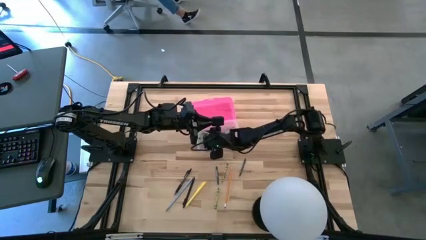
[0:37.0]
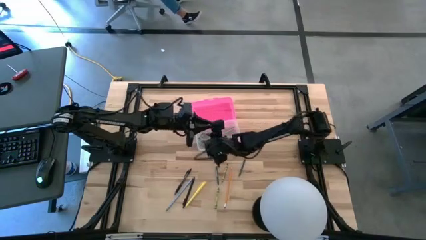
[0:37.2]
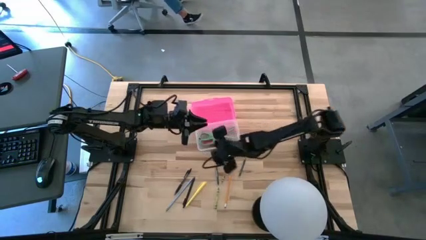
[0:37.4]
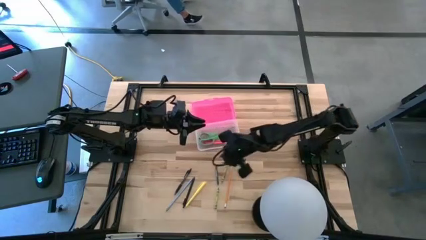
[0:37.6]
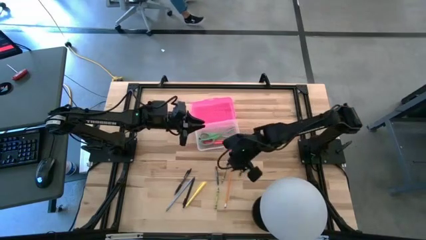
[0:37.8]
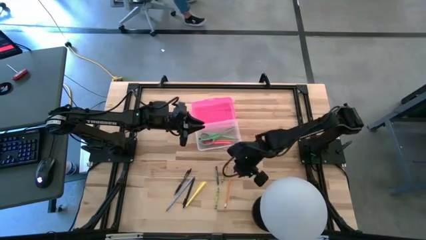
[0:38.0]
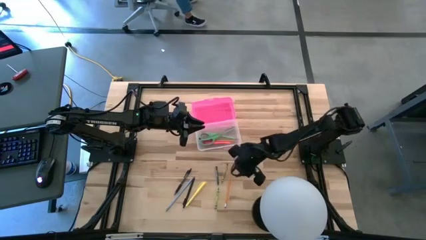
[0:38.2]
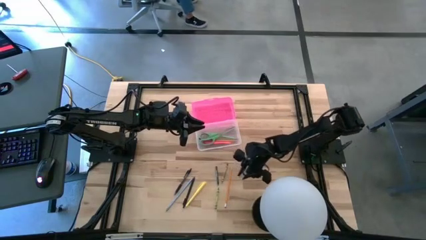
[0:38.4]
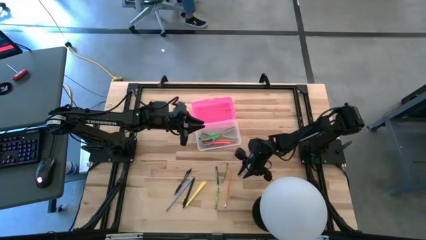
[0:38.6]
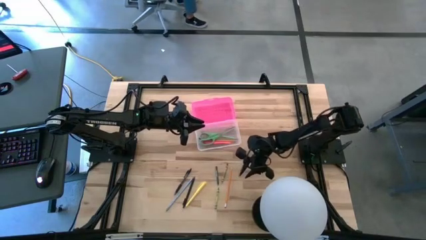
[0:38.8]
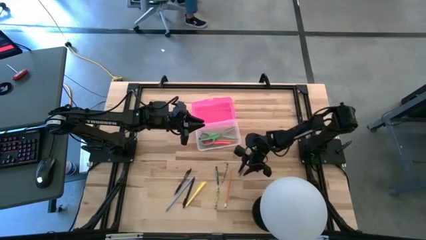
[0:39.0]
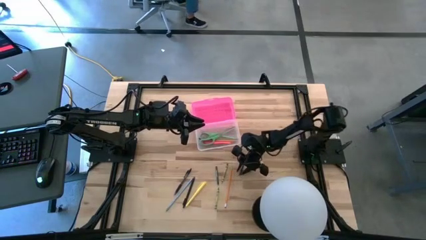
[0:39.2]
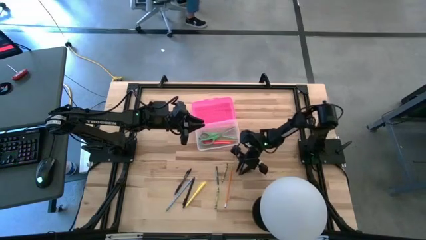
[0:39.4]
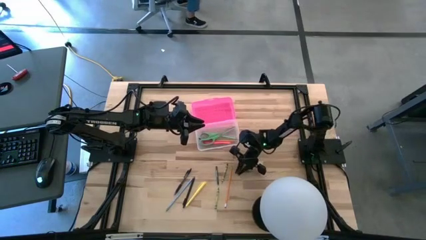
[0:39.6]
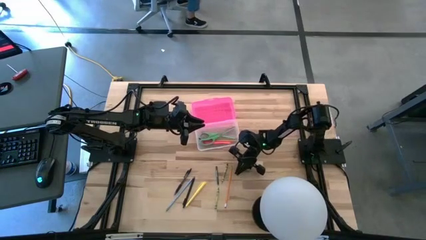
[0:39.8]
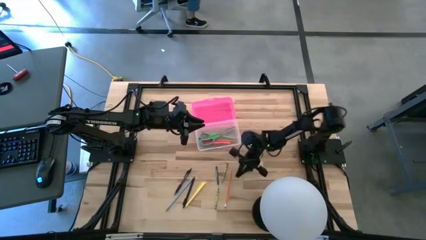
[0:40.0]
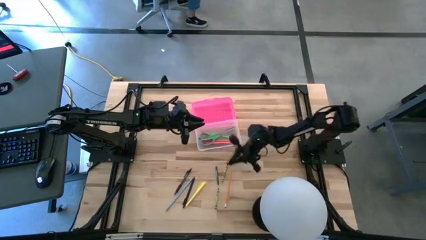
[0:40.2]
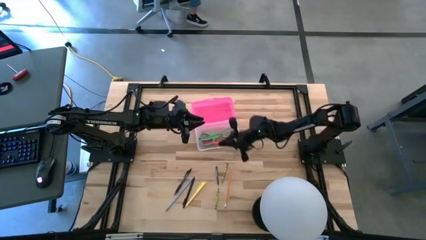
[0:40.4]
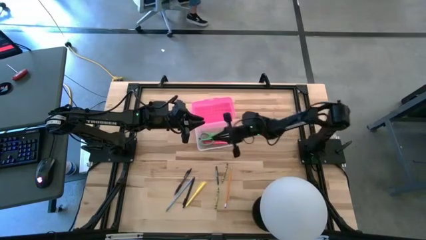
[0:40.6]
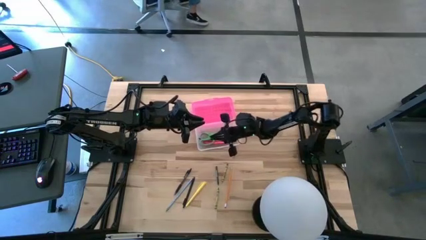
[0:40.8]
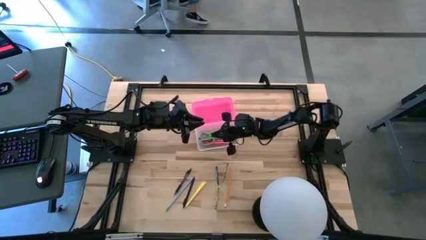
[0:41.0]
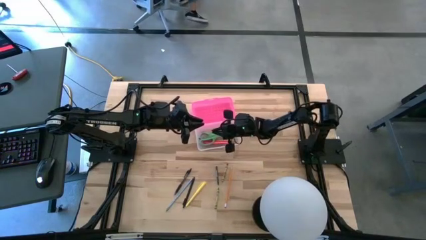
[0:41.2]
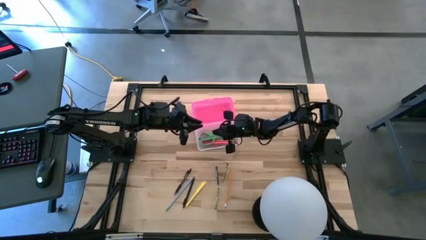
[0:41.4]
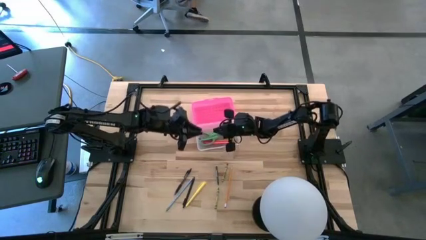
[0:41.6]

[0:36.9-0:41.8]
Task: Pick & place school supplies into a supply box
Put the left blue crayon into the pink supply box

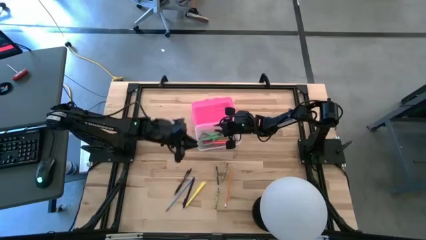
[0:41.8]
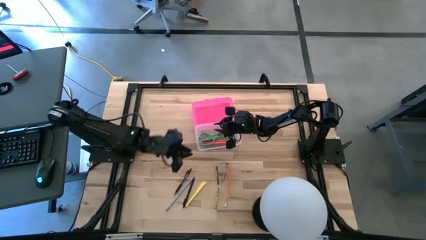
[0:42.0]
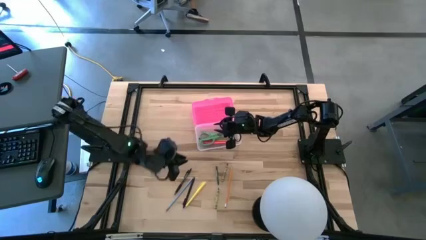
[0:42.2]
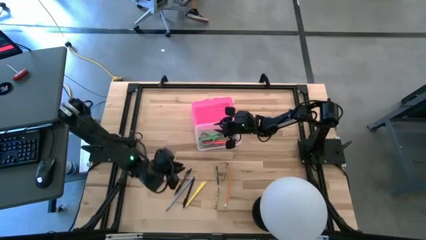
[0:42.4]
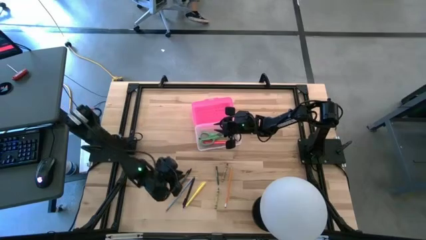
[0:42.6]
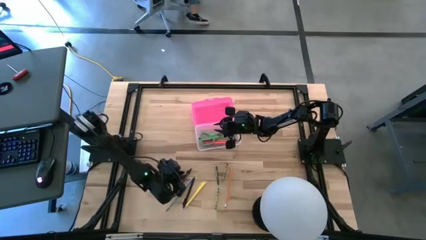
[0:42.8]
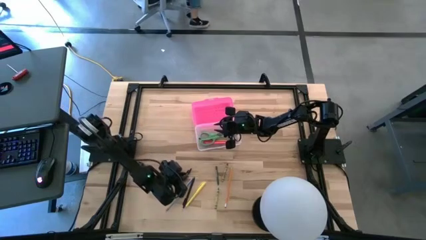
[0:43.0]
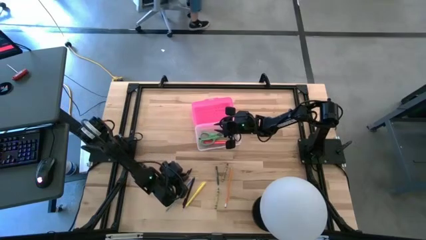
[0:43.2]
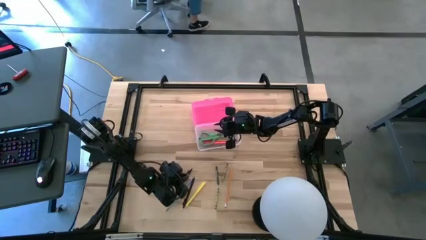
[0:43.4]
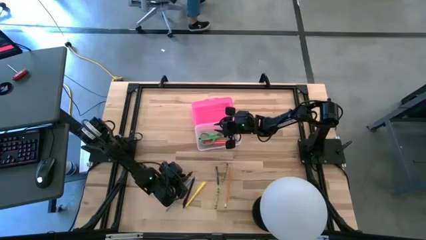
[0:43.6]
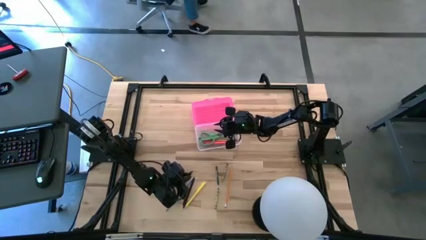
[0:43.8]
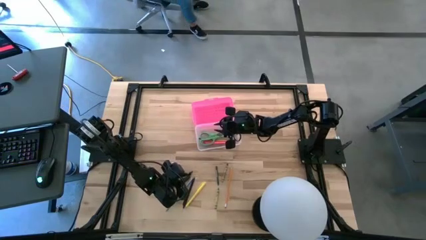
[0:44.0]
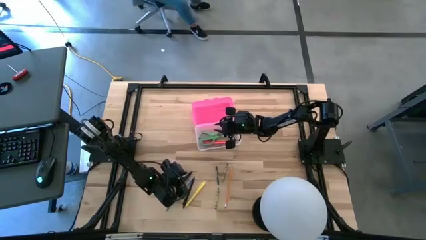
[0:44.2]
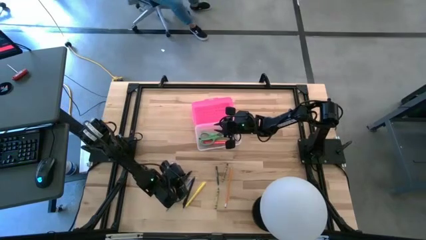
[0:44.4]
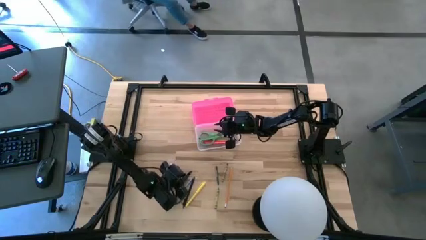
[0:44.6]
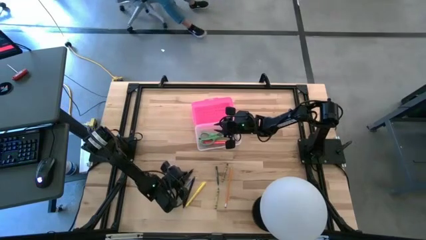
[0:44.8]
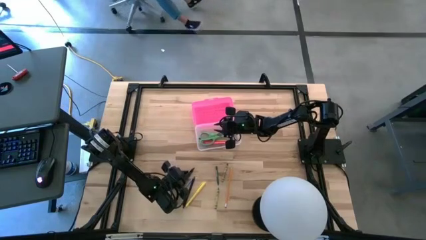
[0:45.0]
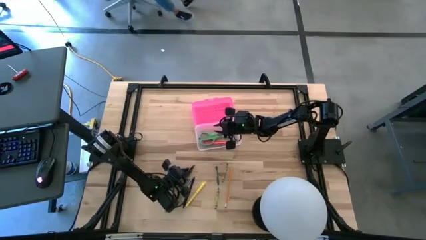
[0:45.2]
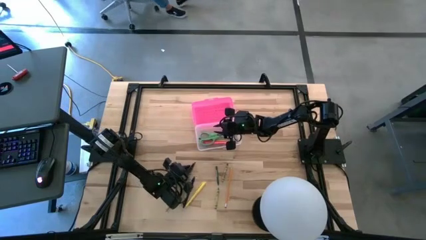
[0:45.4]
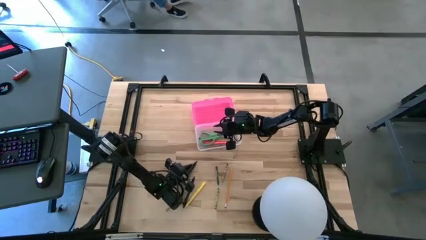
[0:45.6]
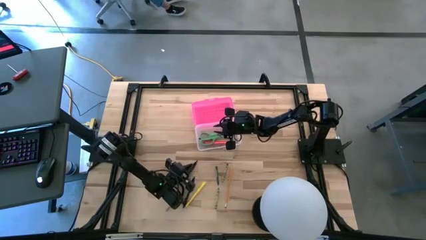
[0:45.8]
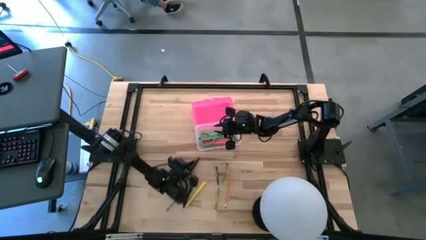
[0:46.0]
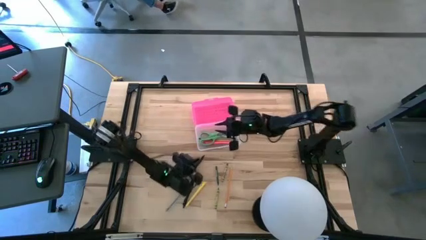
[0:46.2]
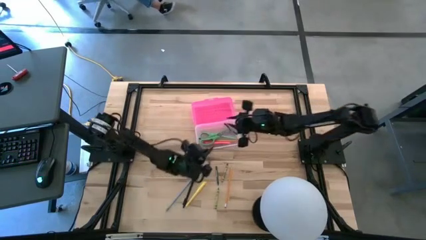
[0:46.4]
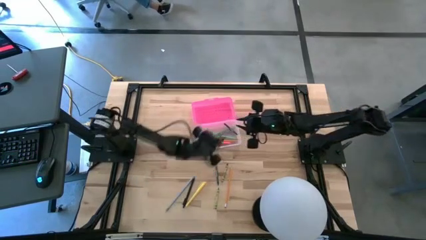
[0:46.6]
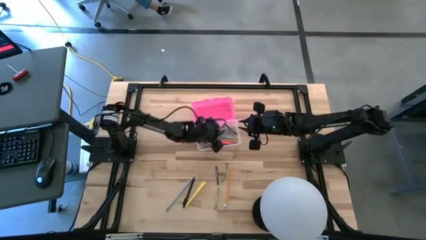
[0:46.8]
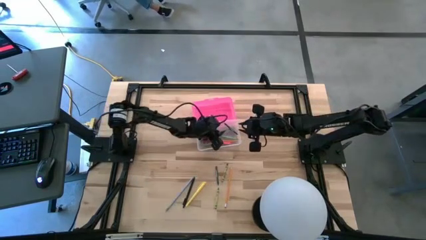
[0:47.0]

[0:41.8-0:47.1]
Put the right black pen into the pink supply box

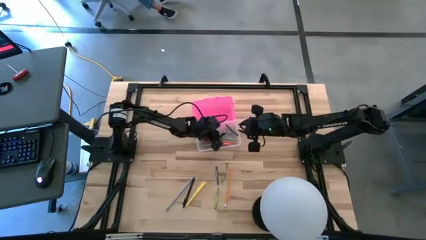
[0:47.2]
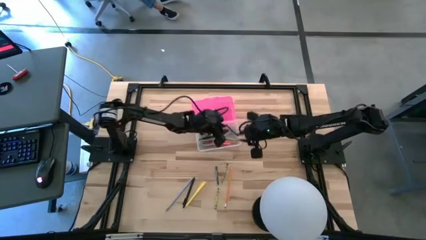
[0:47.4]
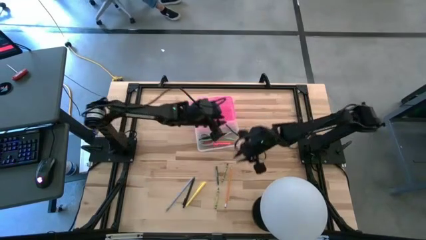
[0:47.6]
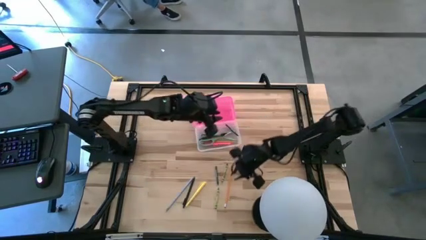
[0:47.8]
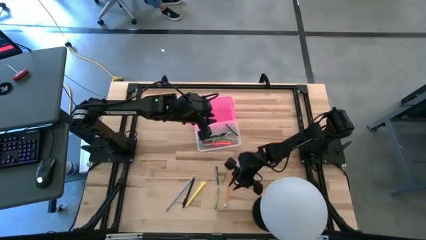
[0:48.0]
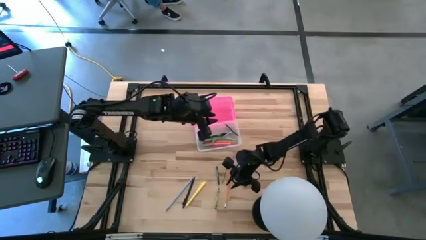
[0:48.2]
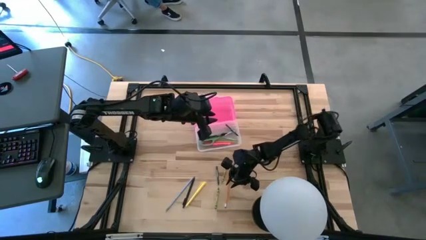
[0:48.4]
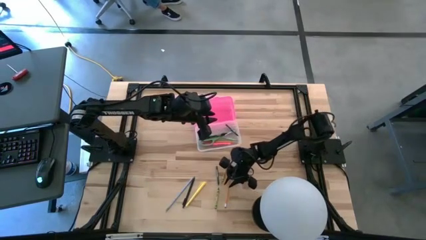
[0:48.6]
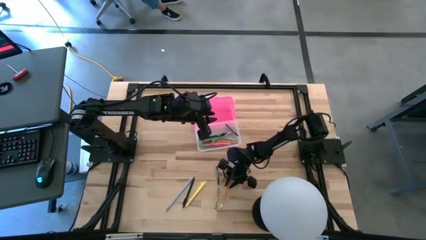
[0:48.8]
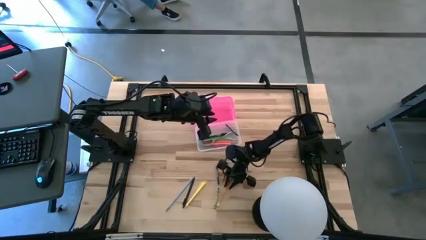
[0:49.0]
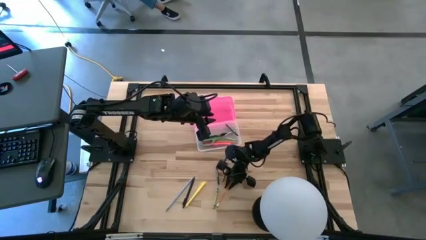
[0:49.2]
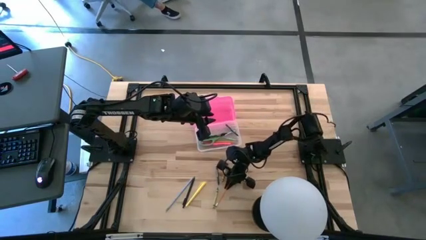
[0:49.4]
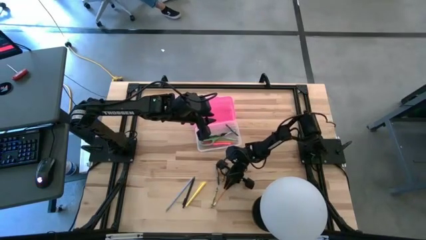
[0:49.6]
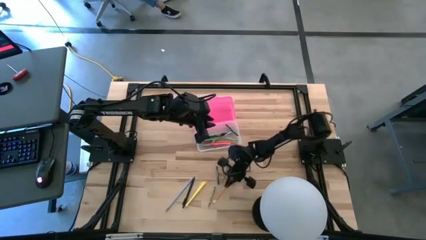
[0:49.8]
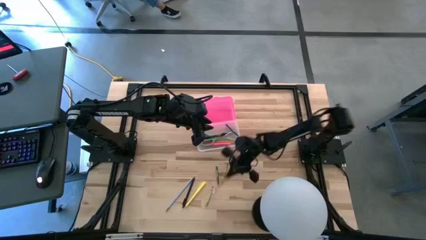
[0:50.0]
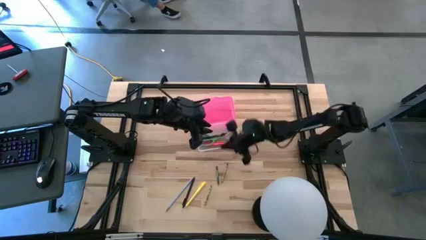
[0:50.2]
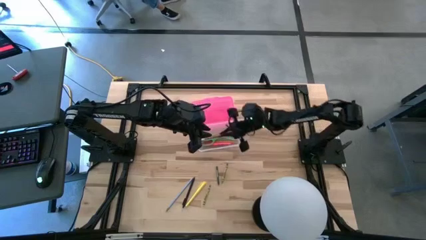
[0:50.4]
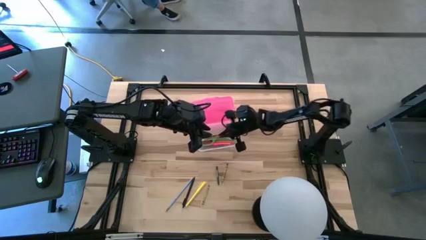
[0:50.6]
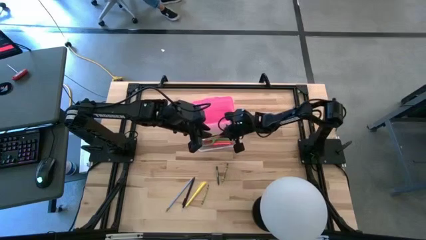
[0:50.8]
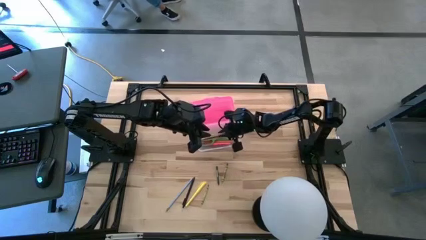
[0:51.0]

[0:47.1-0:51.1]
Put the orange pencil into the pink supply box

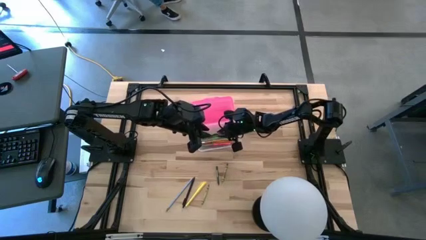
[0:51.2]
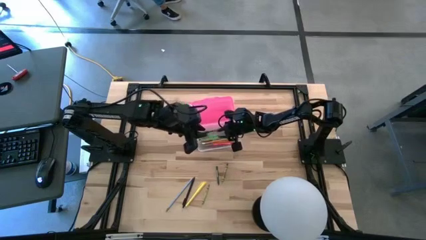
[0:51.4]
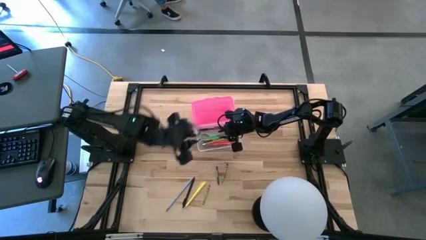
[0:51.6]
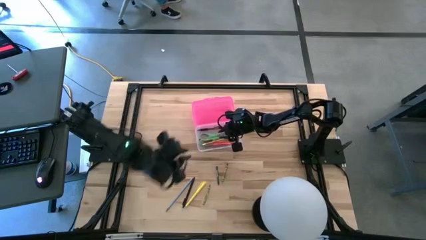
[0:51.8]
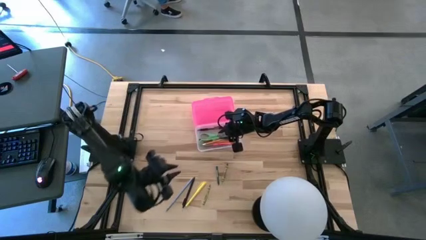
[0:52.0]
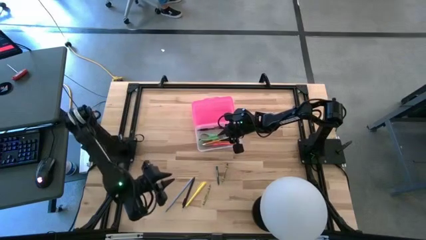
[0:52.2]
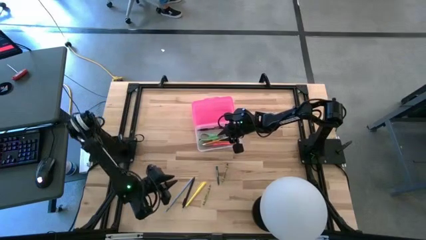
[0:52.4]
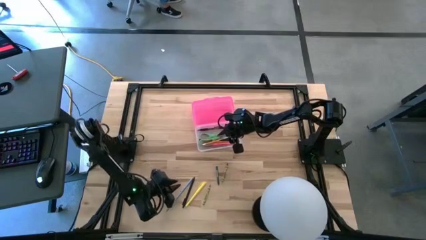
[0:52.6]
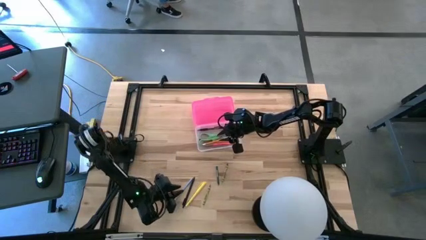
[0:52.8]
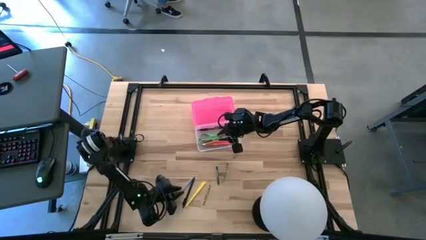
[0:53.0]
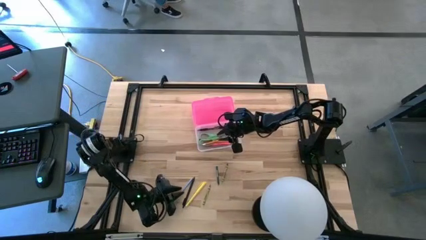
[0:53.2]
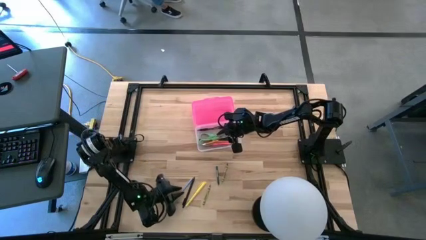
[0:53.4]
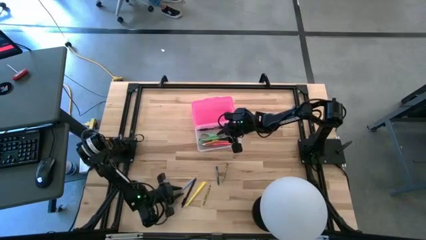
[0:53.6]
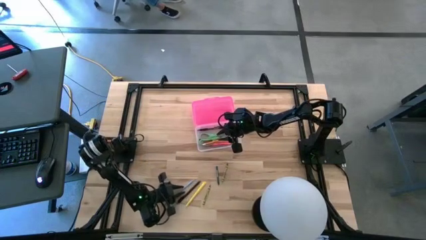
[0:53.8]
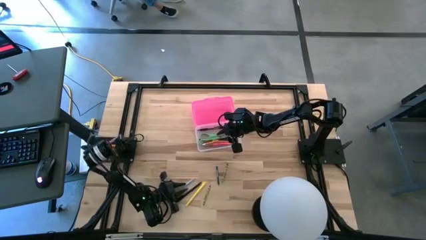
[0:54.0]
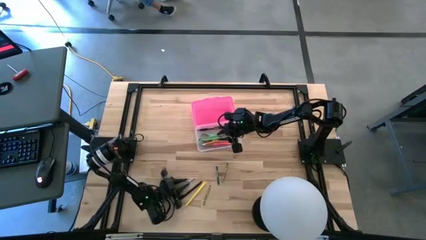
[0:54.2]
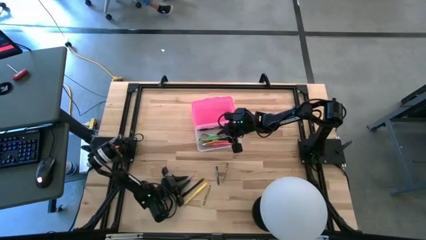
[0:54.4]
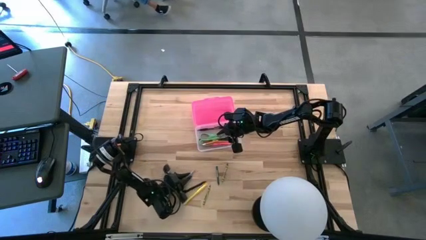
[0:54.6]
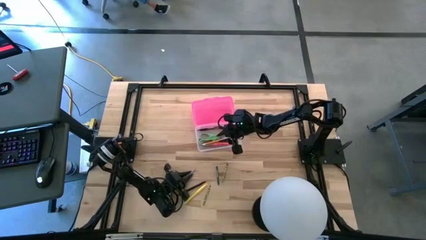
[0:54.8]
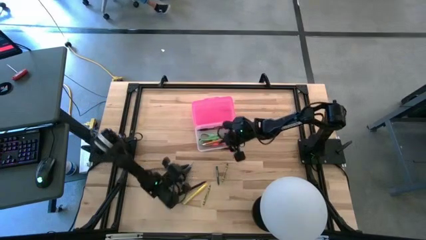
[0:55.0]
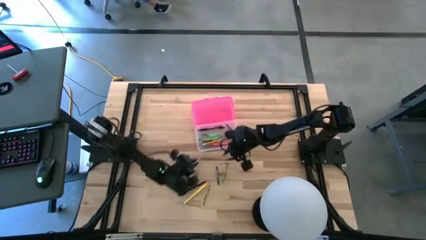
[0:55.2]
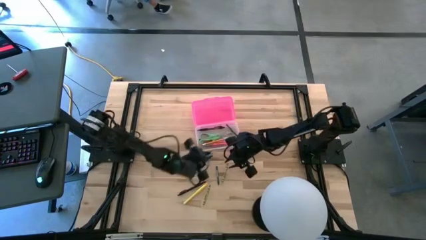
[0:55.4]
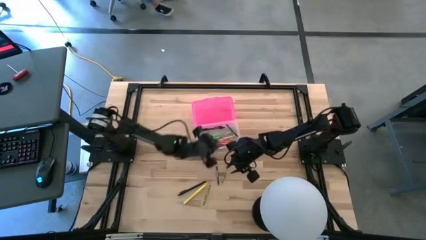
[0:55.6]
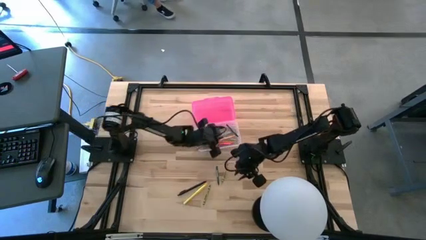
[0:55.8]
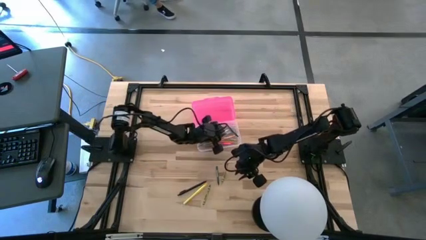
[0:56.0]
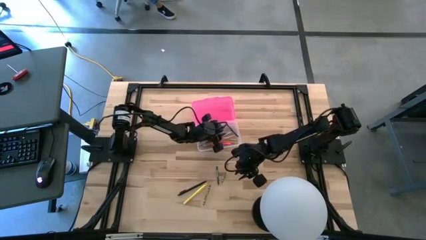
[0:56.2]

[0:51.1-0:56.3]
Put the blue pencil into the pink supply box
